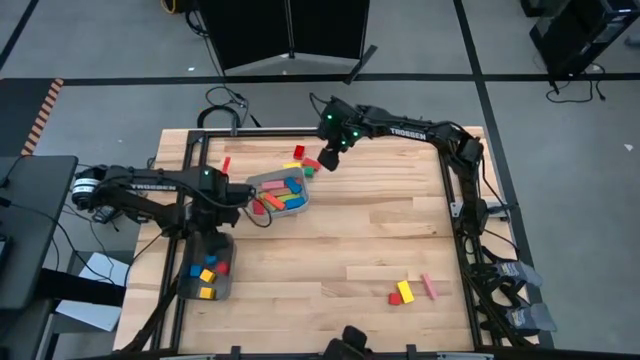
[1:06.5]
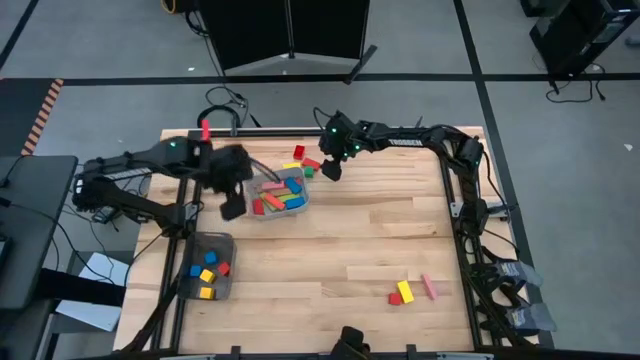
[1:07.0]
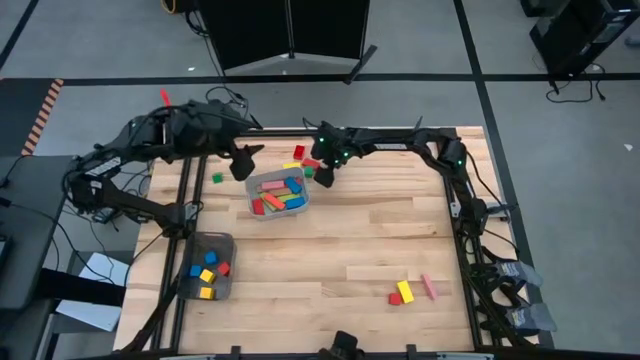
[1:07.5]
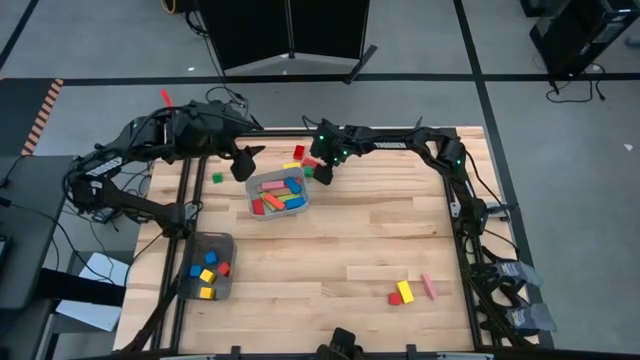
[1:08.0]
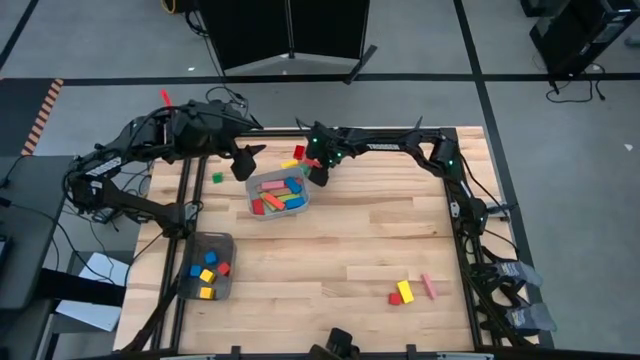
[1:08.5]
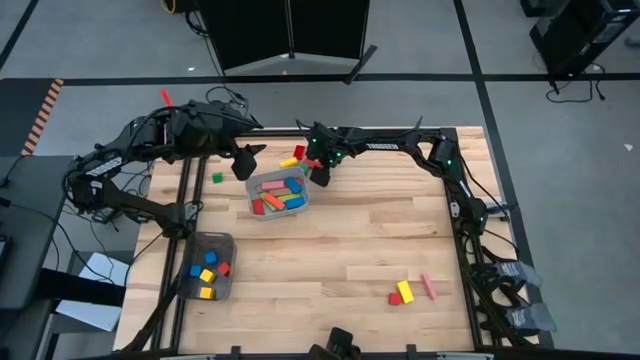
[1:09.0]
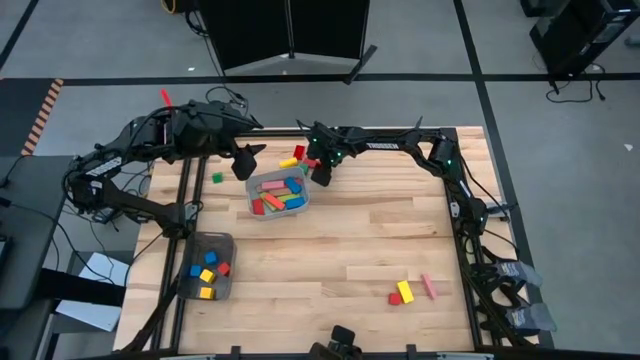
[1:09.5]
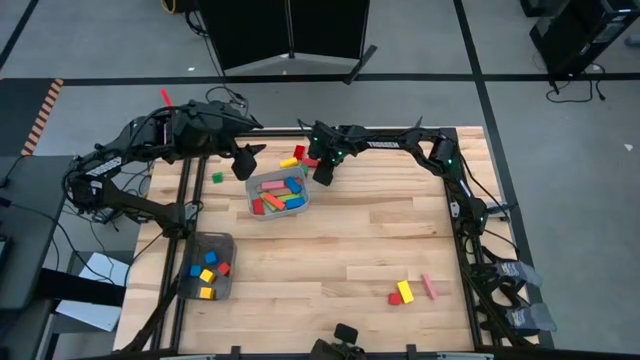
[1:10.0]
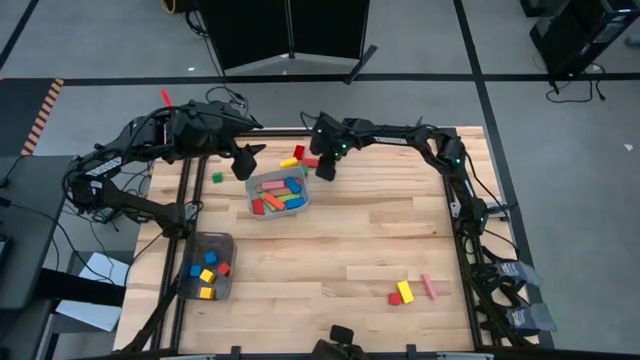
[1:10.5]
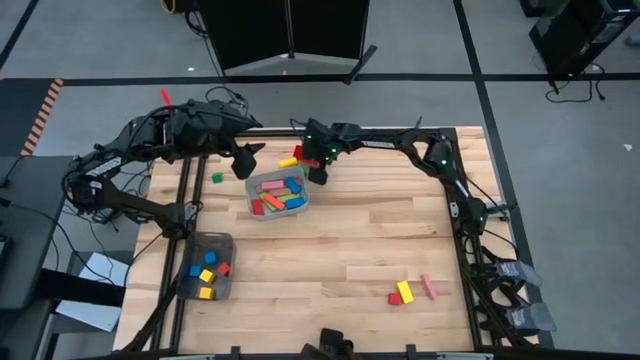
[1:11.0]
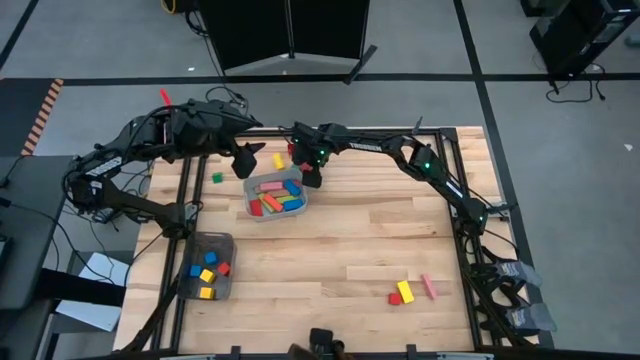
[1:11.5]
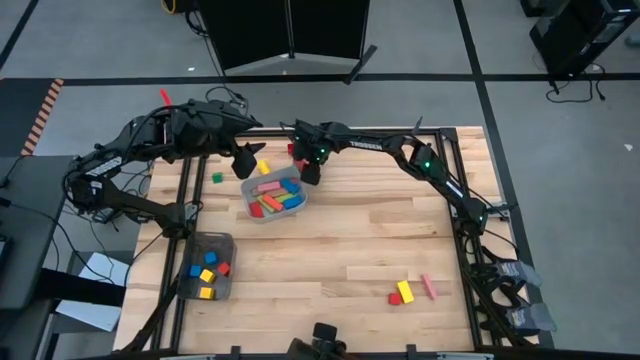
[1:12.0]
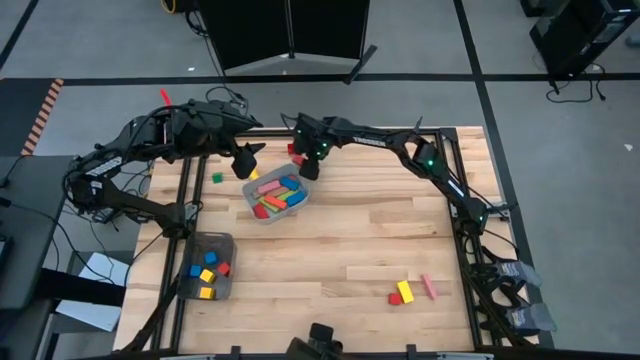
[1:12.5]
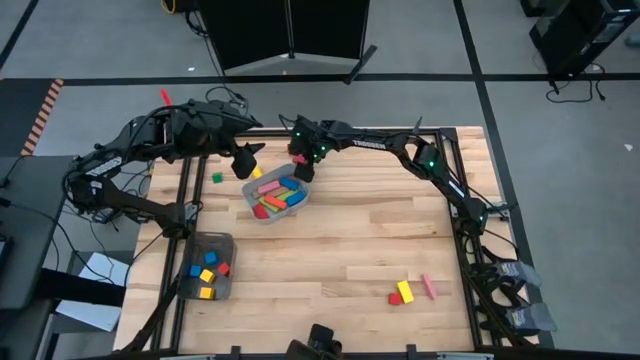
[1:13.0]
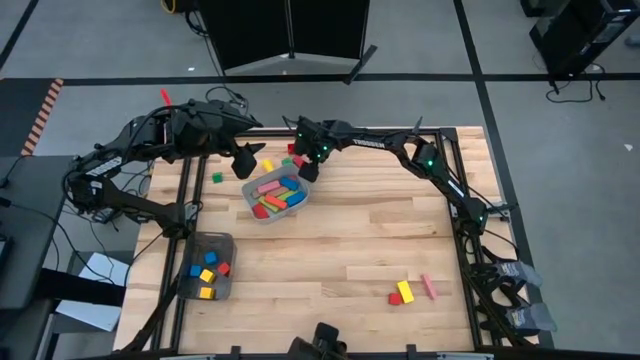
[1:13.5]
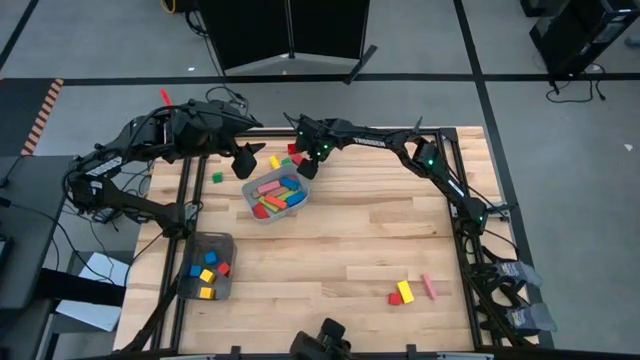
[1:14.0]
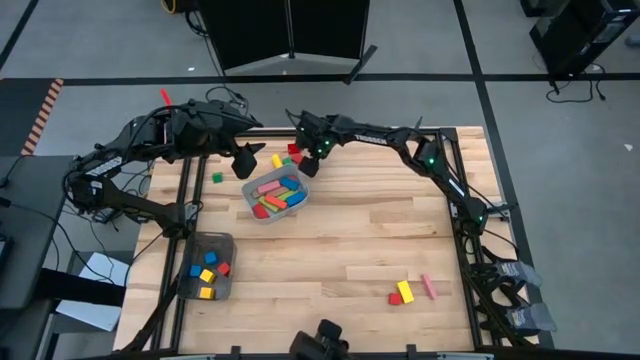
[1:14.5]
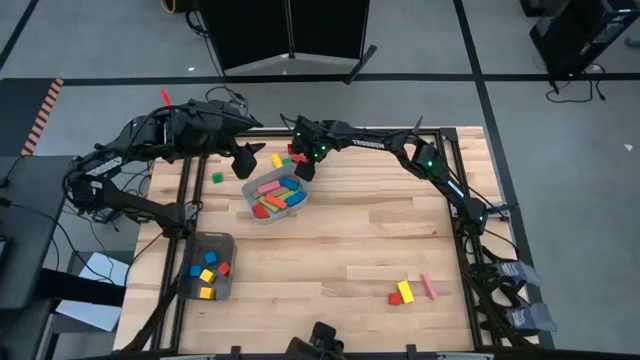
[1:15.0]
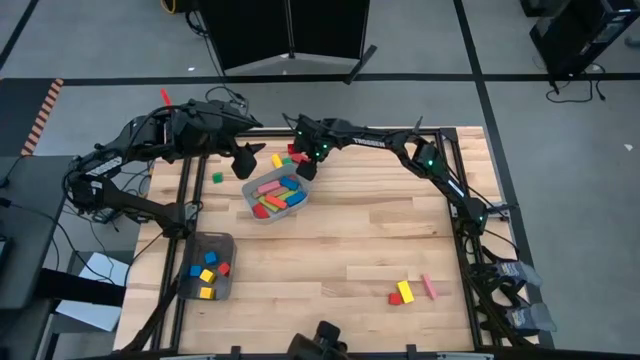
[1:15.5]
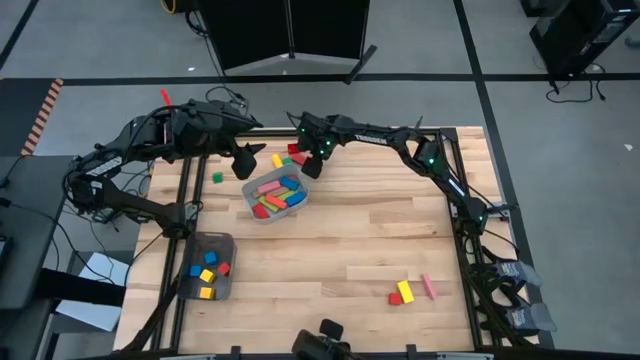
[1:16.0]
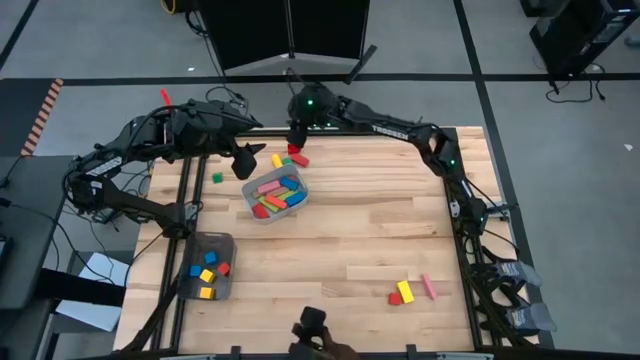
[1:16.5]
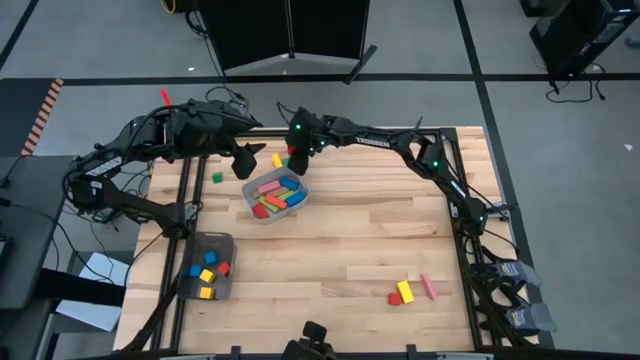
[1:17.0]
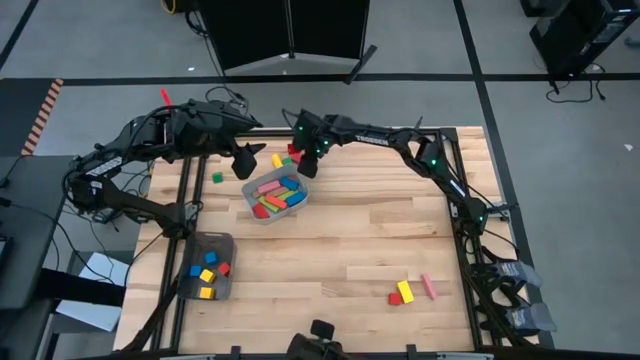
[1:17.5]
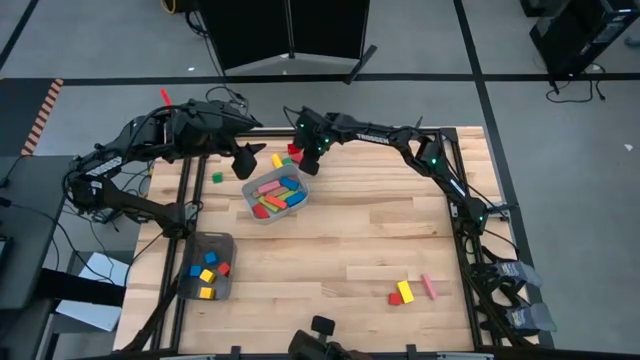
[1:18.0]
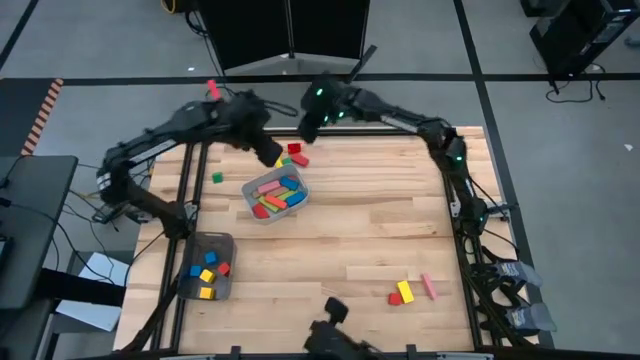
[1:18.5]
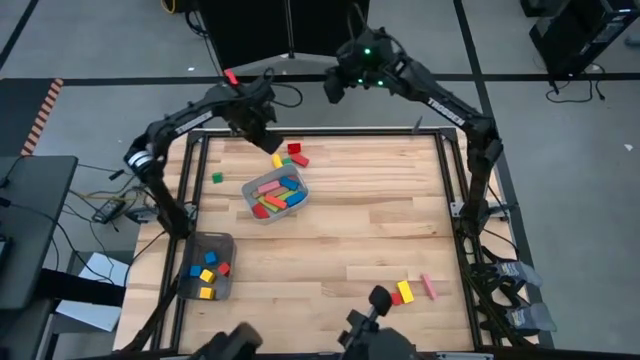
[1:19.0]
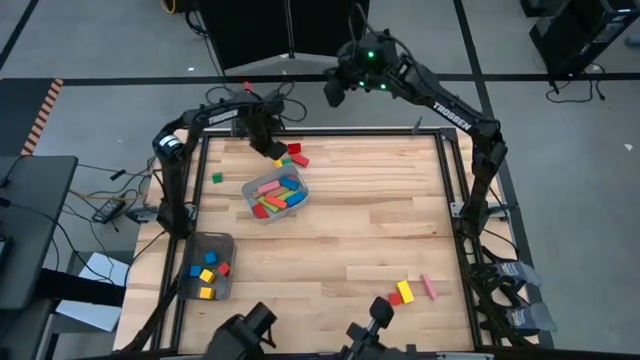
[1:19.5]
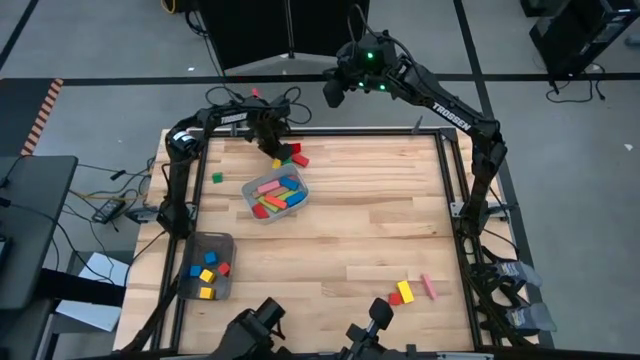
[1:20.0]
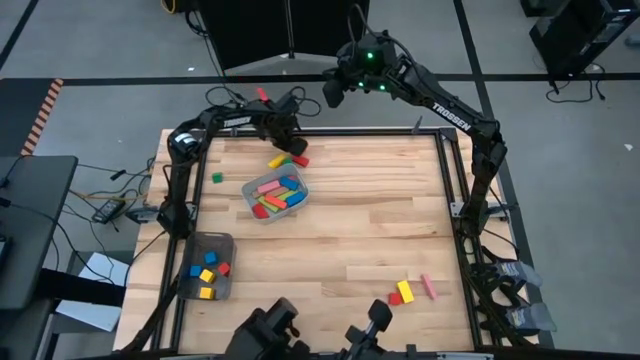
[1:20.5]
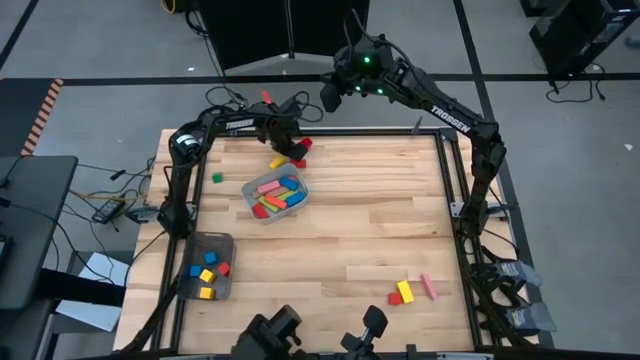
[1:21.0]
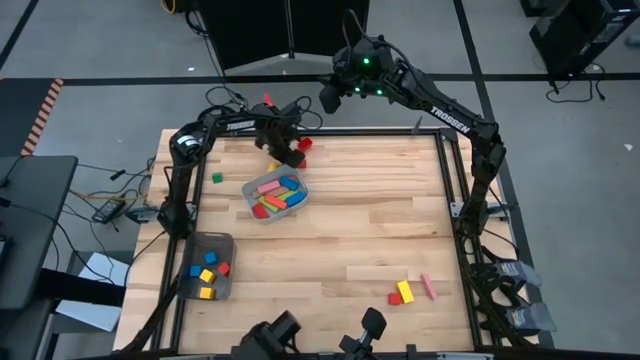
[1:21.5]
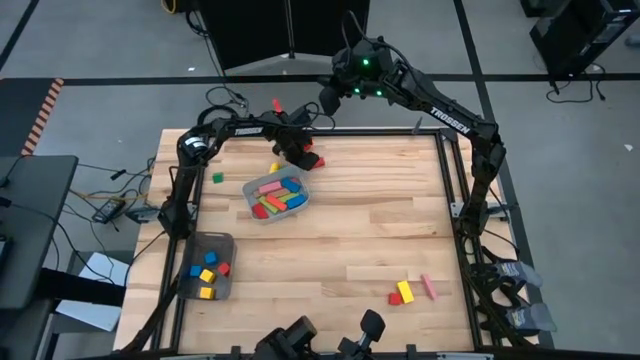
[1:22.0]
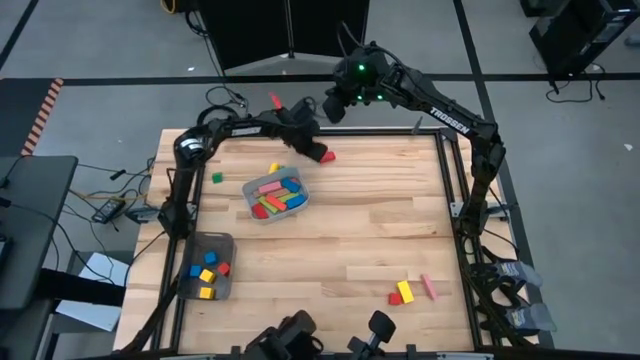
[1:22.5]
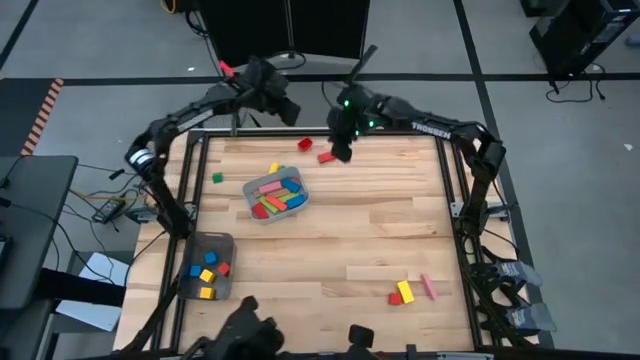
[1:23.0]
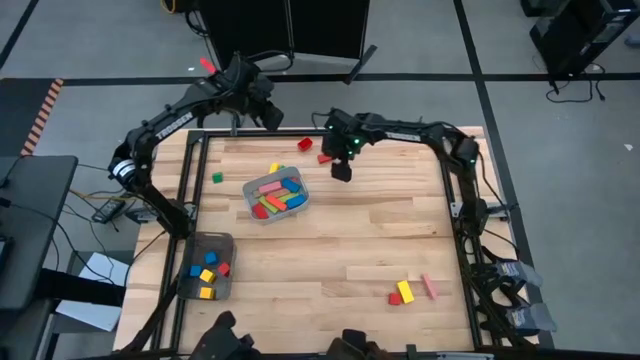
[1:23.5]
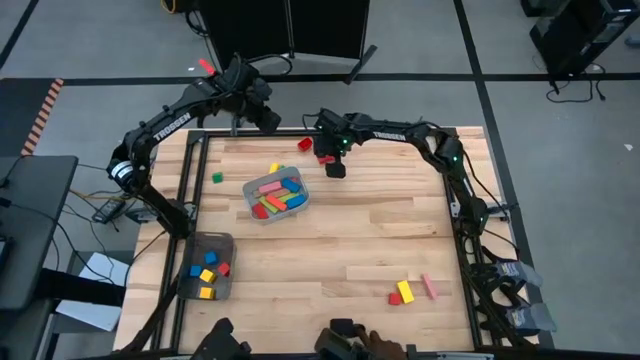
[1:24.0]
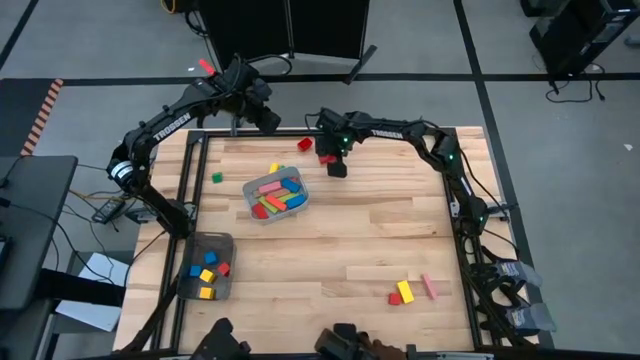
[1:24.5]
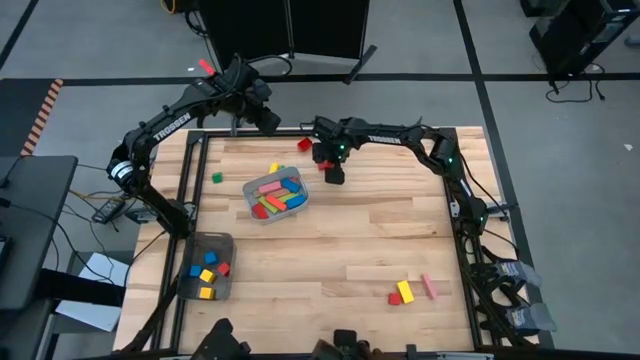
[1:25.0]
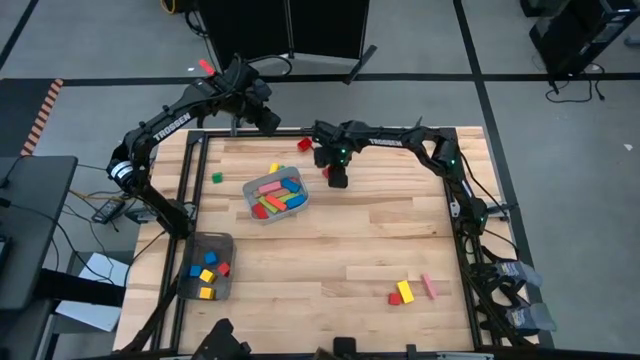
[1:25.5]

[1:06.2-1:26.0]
Task: Sort blocks by size
Put the orange rectangular block into the gray bin

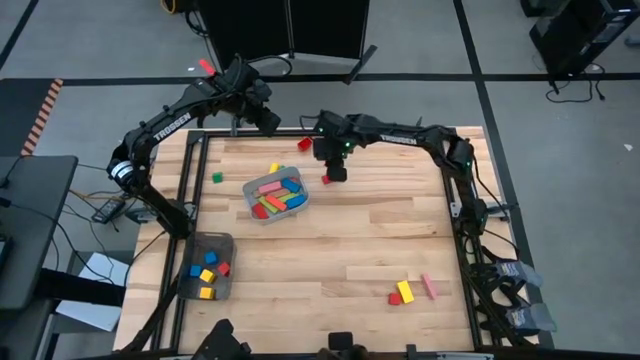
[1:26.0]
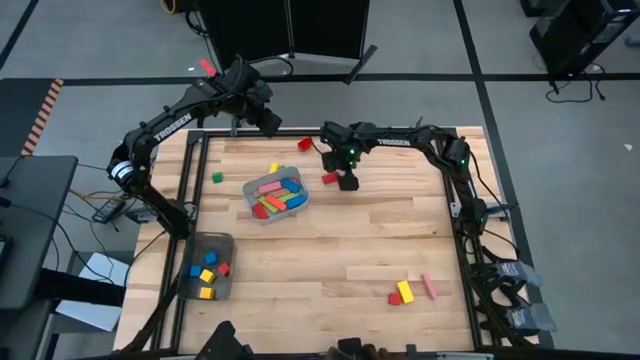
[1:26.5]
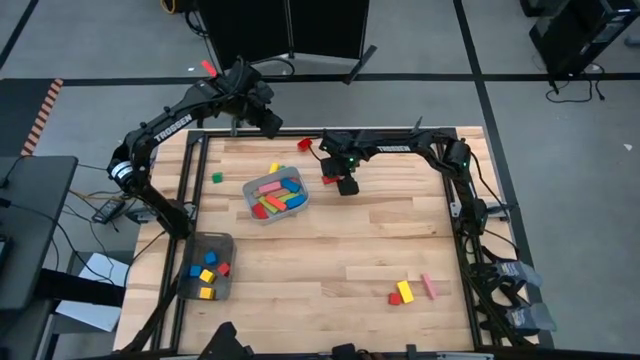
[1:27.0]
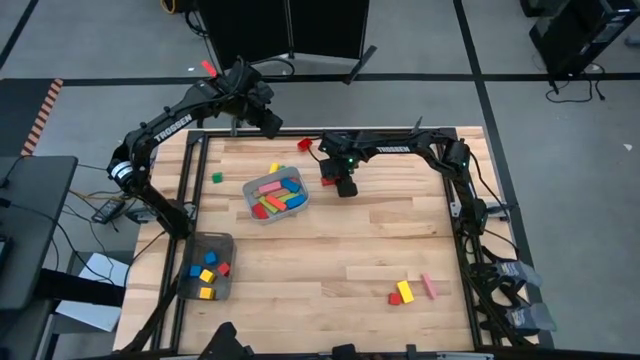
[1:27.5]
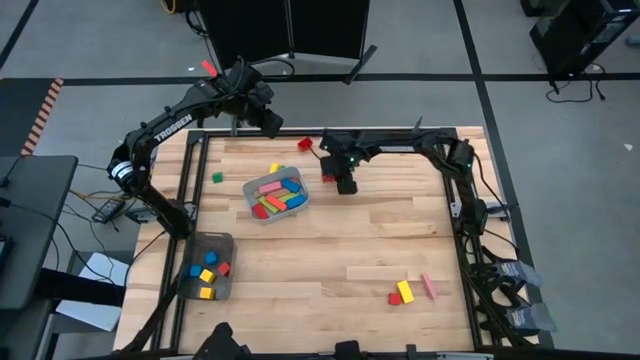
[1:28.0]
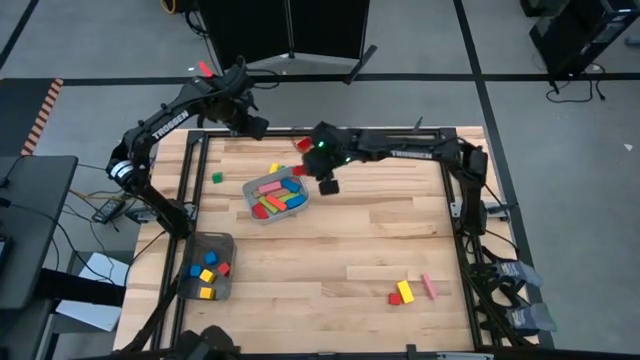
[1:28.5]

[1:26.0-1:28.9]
Put the orange rectangular block into the gray bin
